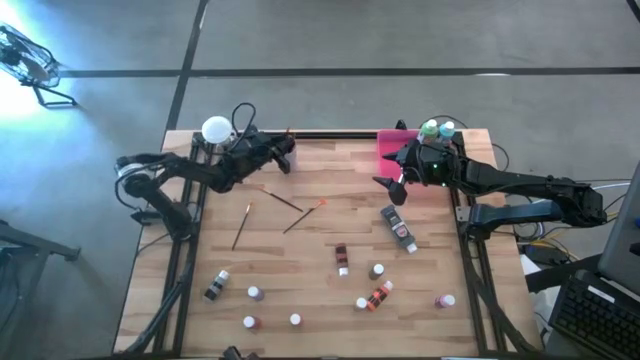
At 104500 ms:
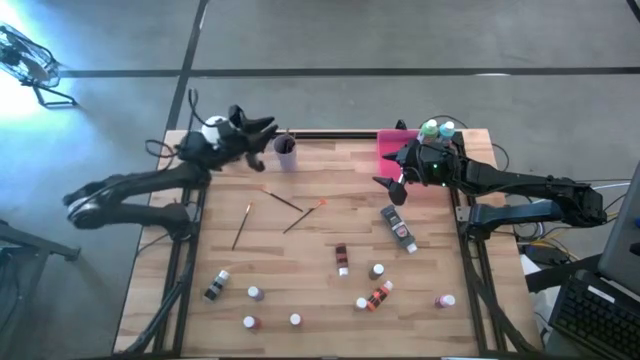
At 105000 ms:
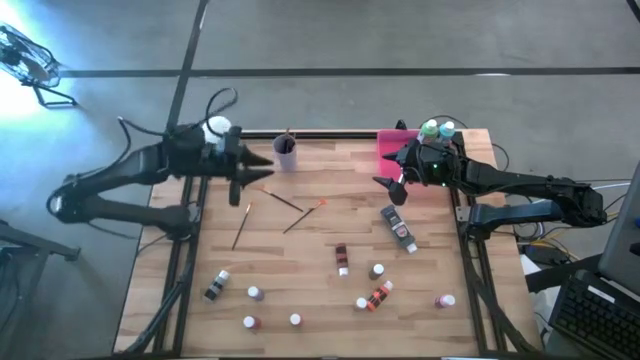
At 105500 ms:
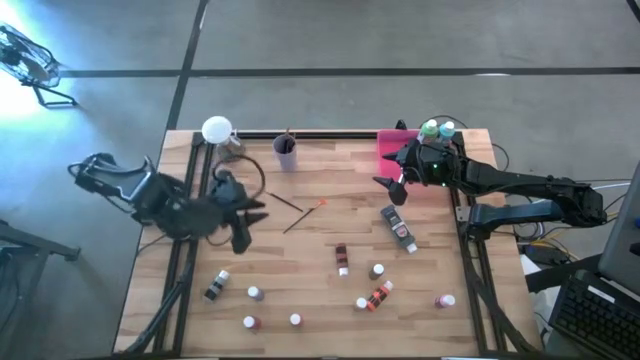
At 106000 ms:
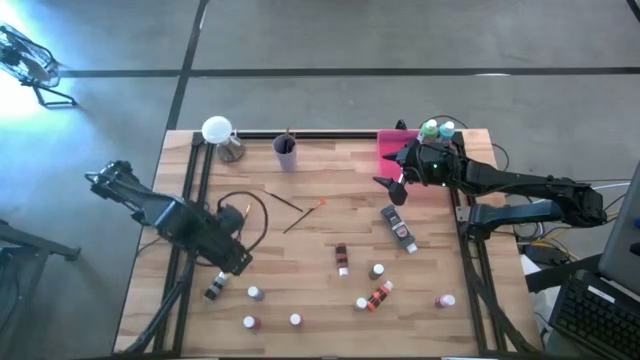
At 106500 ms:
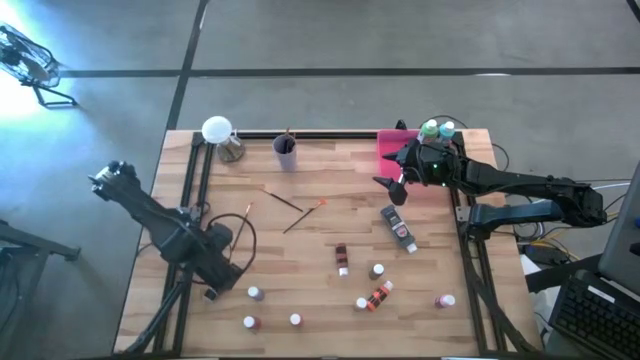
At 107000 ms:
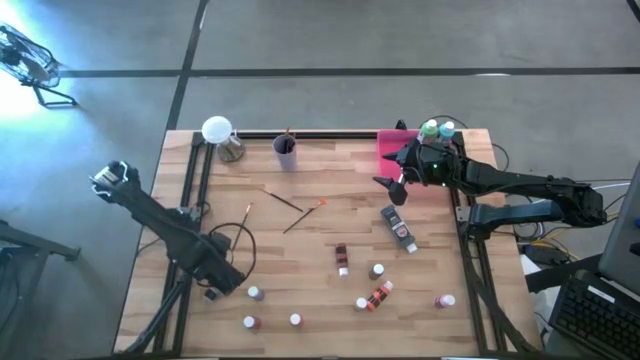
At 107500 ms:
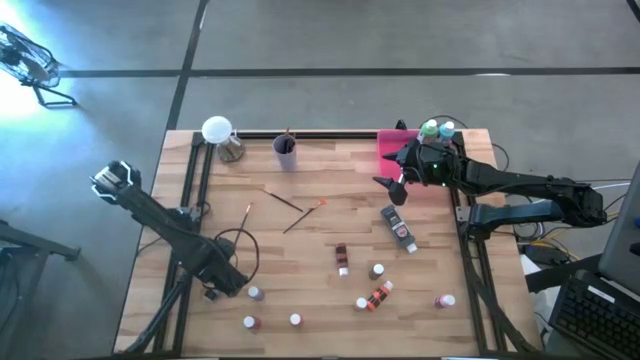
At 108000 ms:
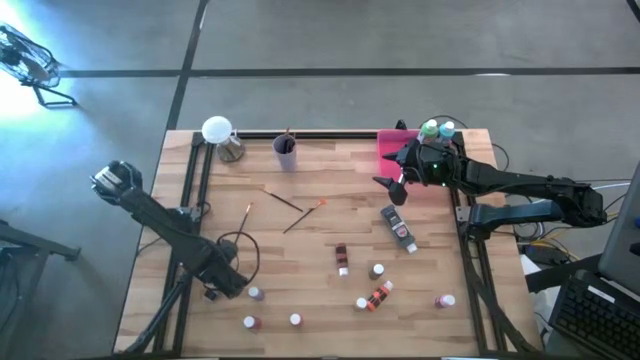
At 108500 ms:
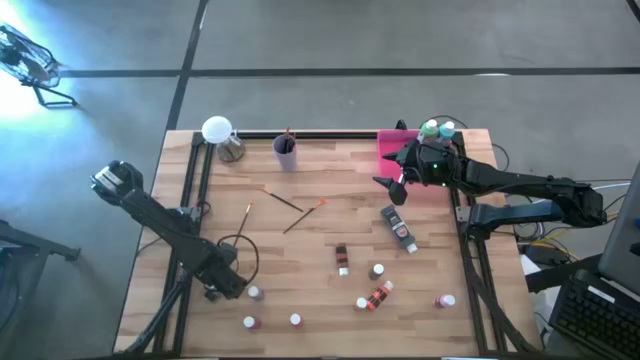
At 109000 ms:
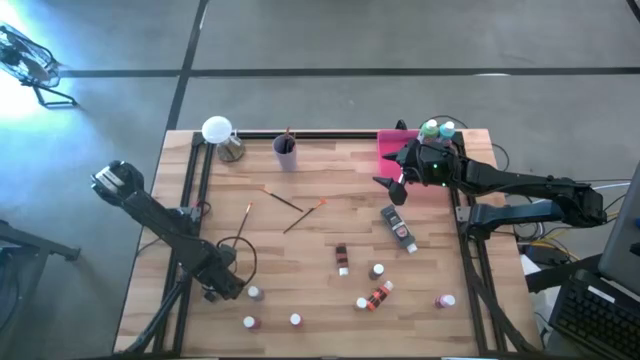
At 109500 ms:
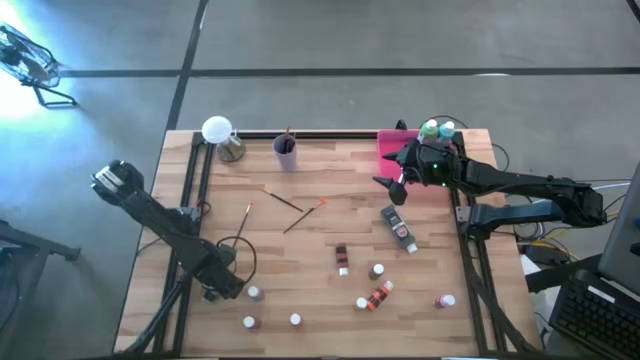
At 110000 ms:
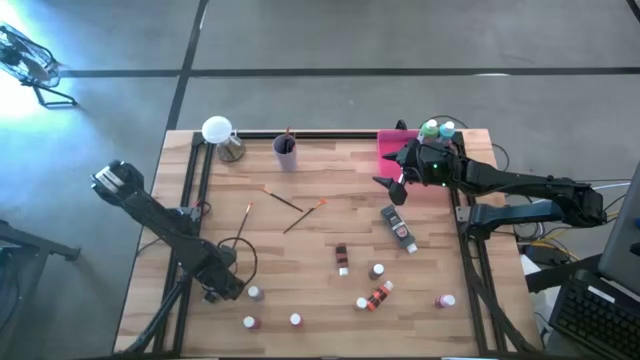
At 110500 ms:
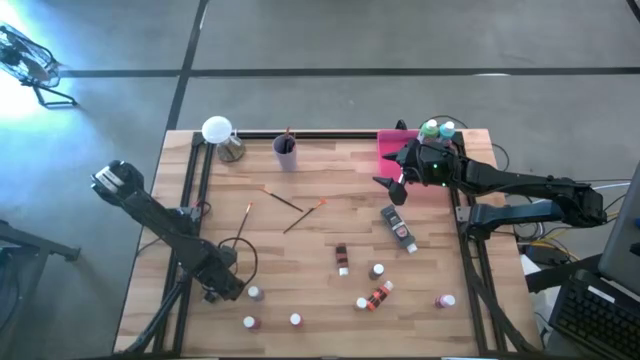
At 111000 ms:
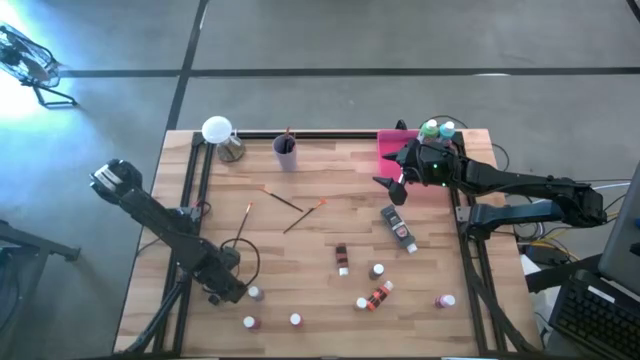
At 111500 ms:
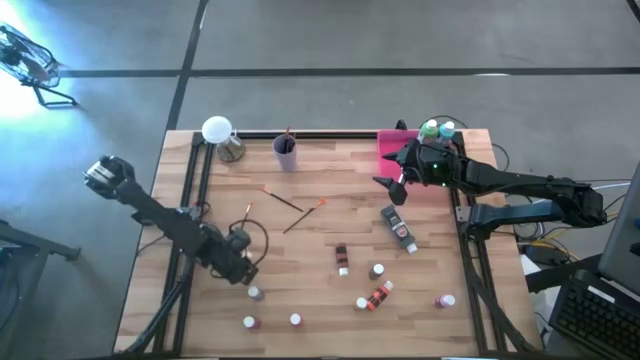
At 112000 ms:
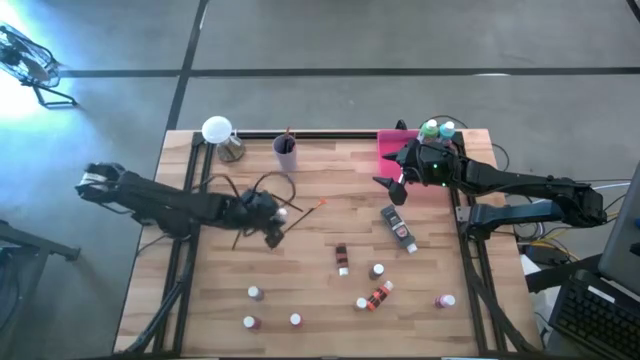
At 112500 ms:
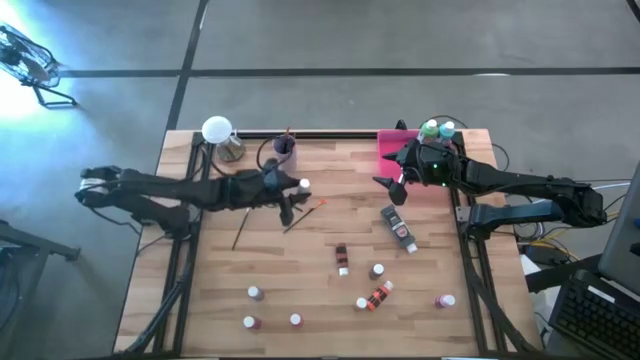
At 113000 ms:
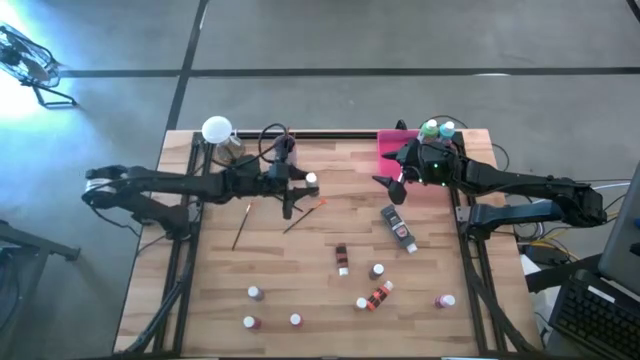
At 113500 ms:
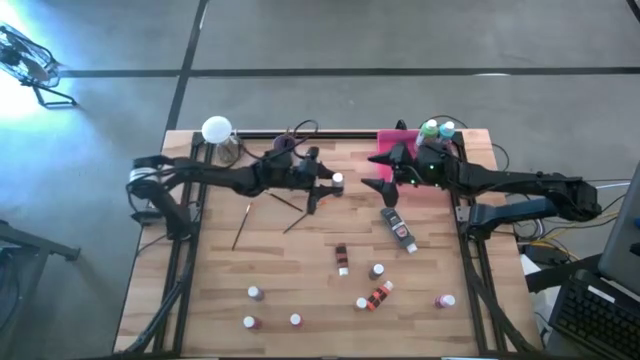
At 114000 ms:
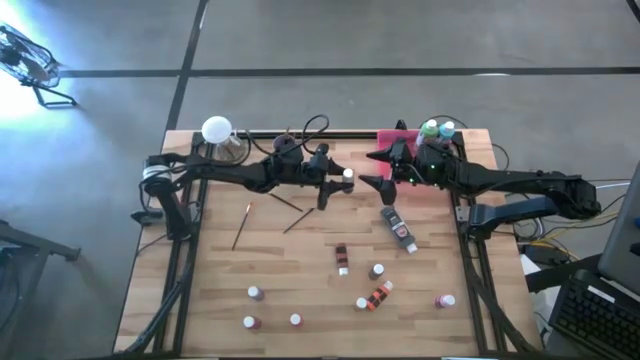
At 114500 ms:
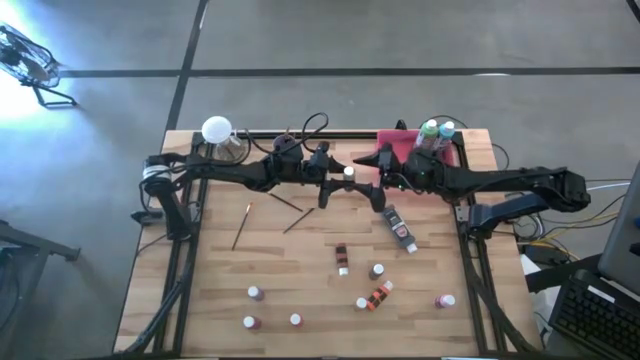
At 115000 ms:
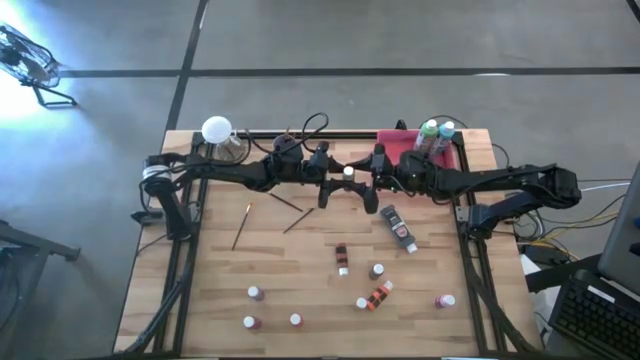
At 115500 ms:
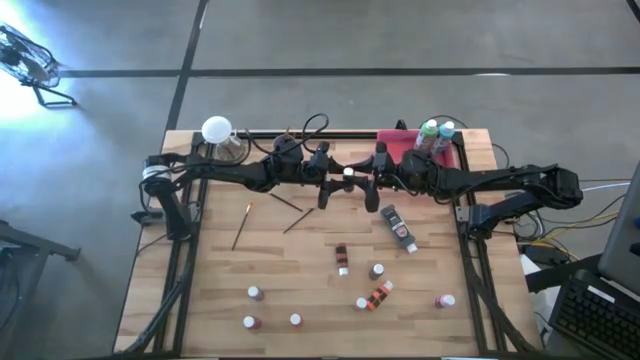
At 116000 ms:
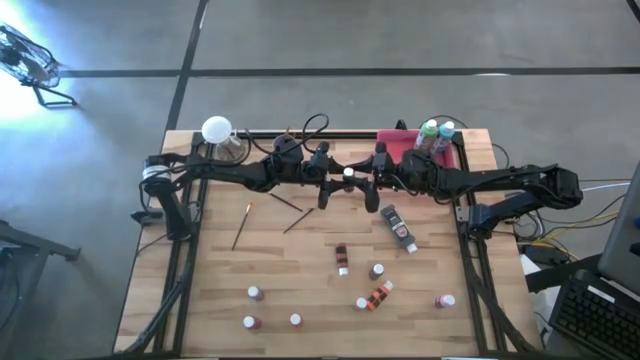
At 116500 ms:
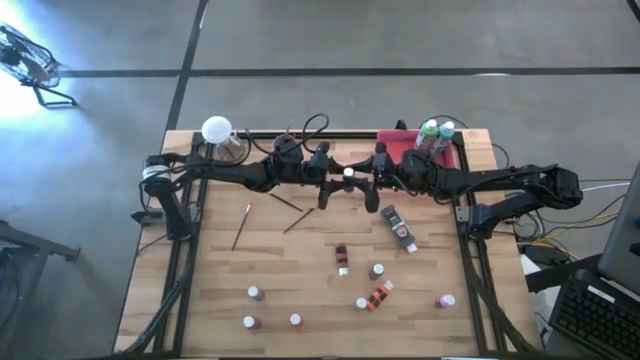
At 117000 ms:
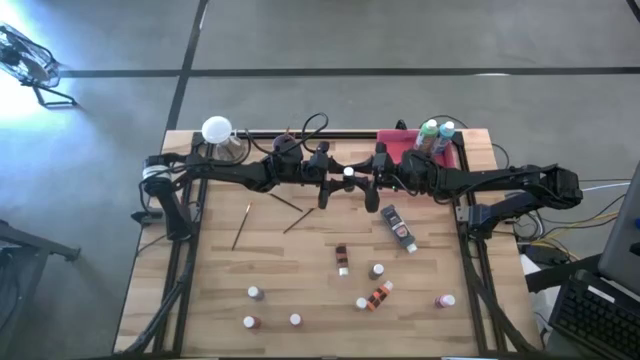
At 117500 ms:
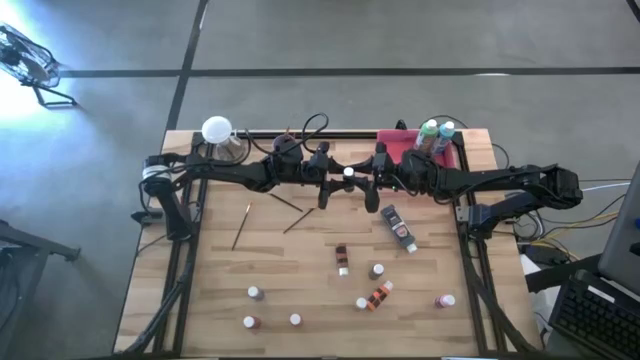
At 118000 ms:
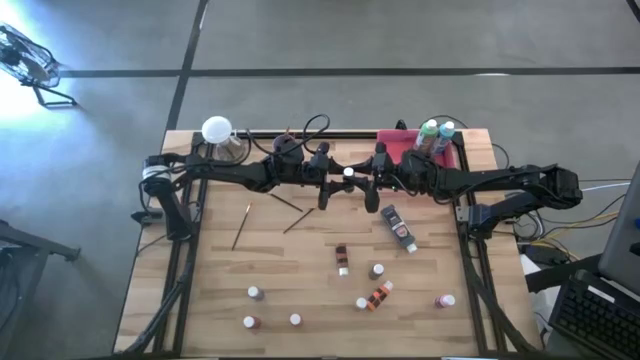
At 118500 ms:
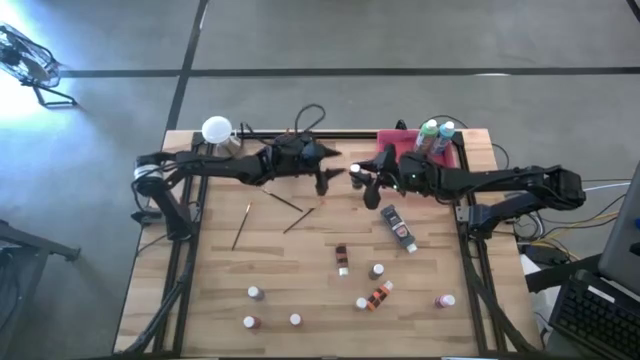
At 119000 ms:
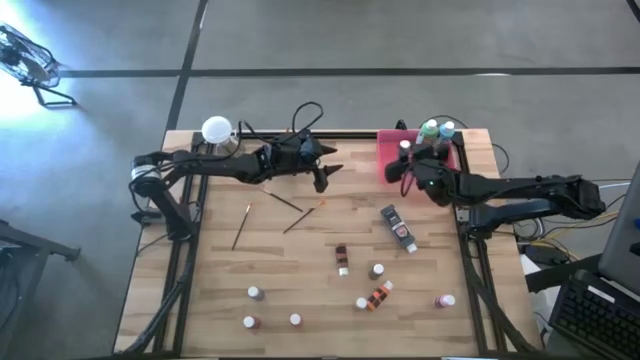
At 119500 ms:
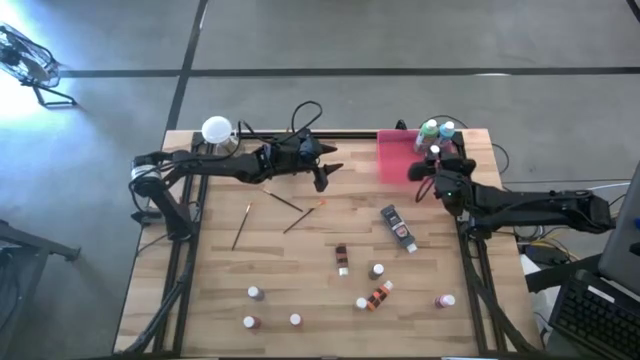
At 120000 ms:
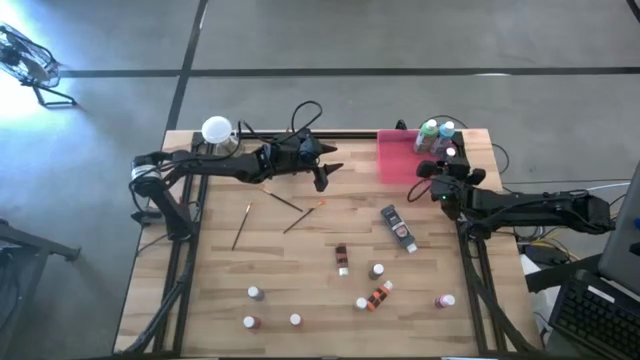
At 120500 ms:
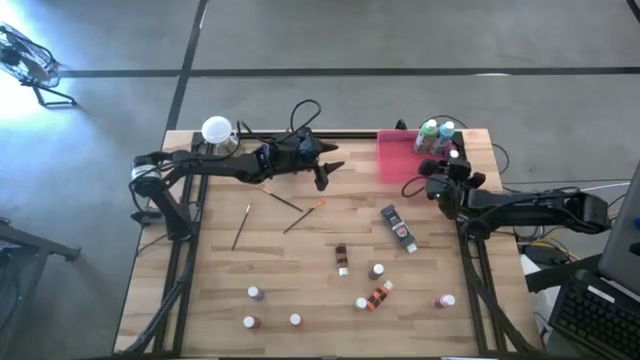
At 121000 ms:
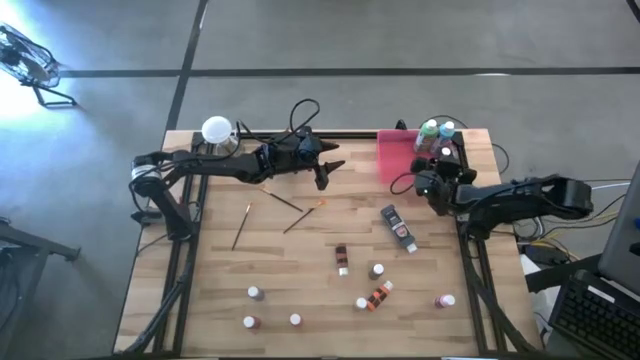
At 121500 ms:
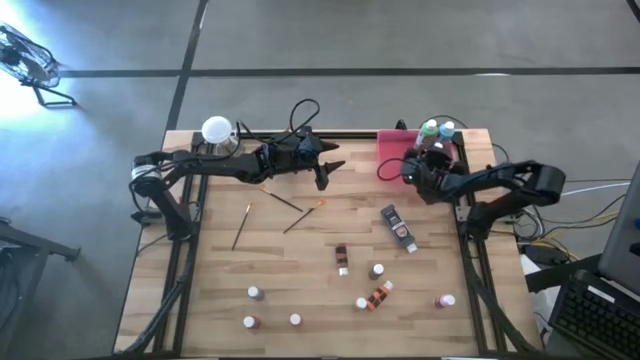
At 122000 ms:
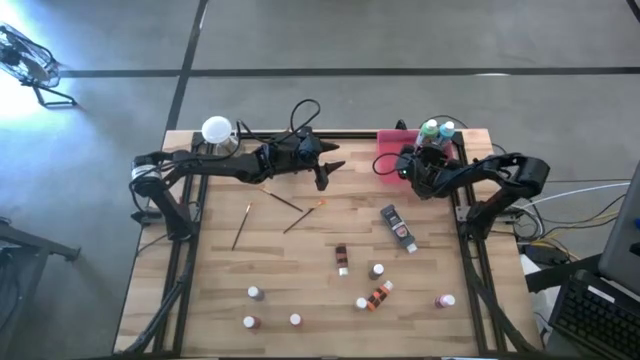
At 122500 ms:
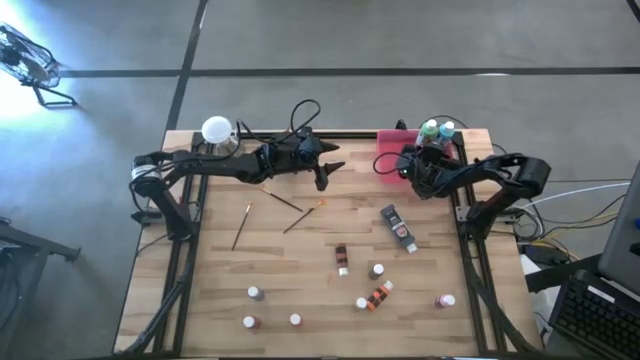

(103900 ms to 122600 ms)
Task: Pick & Place Paint Supplies
Put the small gray paint bottle into the pink bin

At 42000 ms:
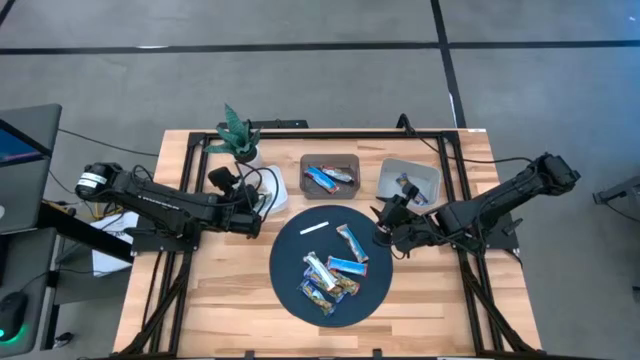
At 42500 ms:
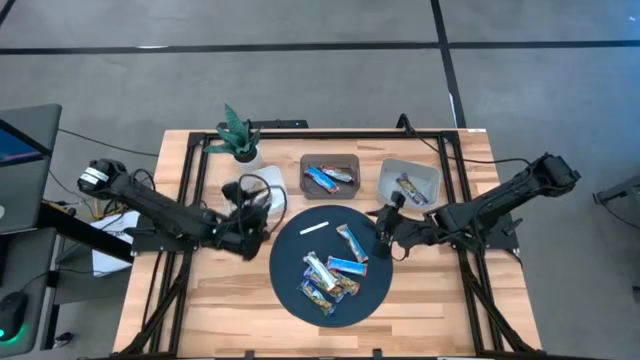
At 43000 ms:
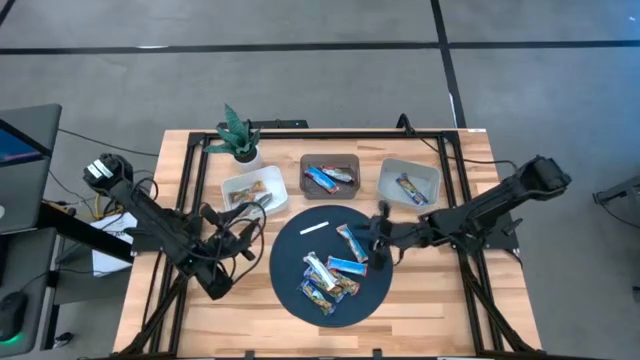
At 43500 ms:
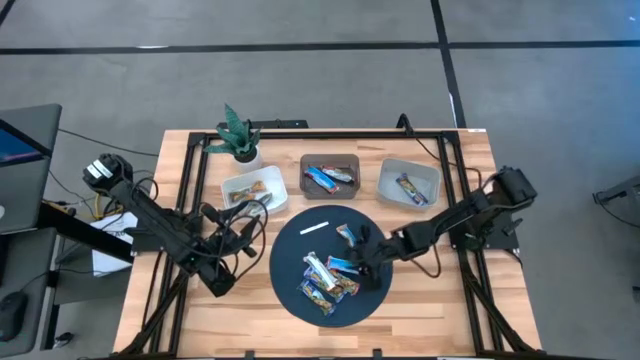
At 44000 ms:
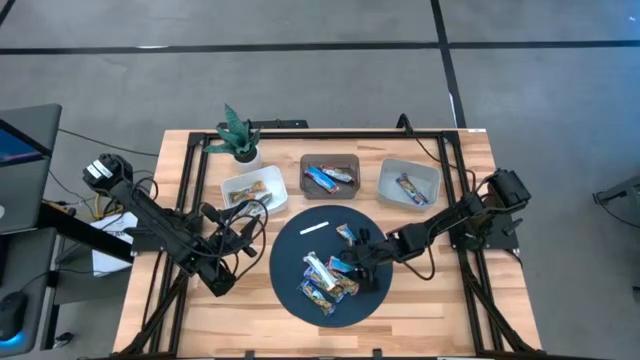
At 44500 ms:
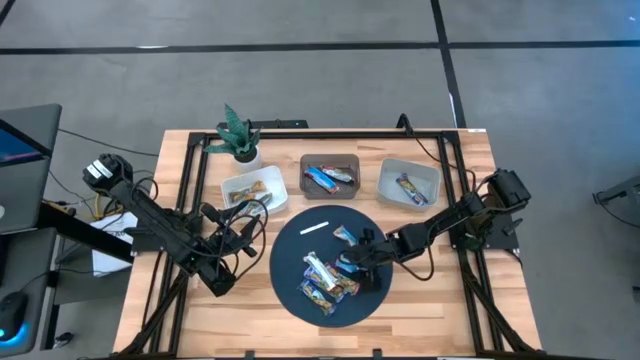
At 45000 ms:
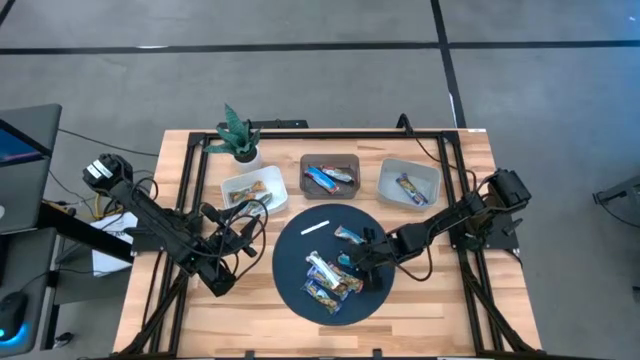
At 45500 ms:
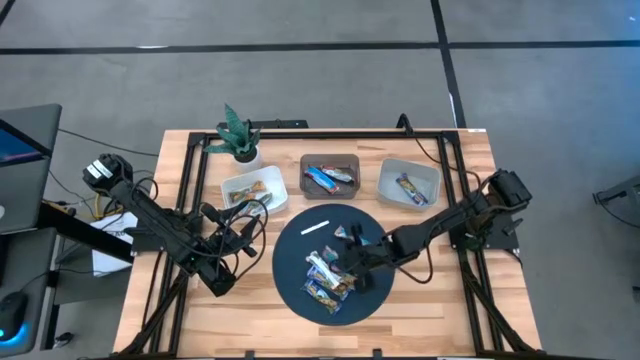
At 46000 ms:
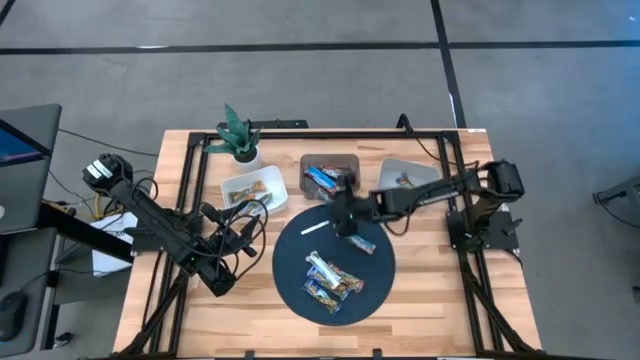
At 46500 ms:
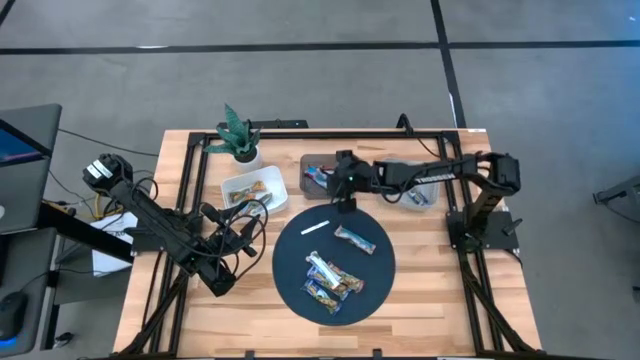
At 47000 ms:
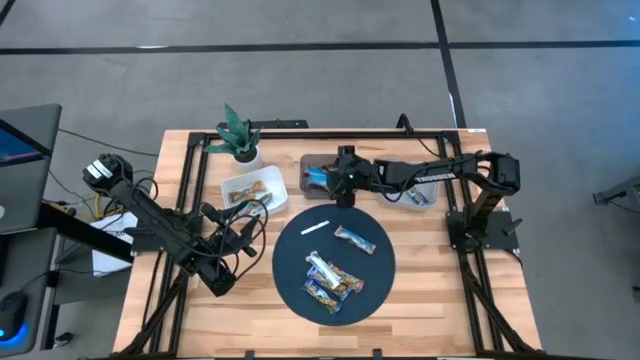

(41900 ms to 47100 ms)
Task: Pick and place Granola Bars by type
Put the top red granola bar into the black bin
